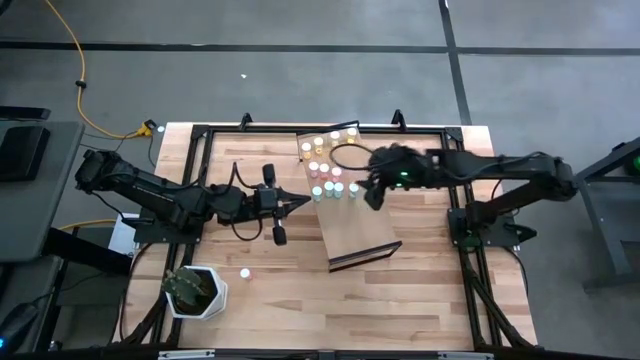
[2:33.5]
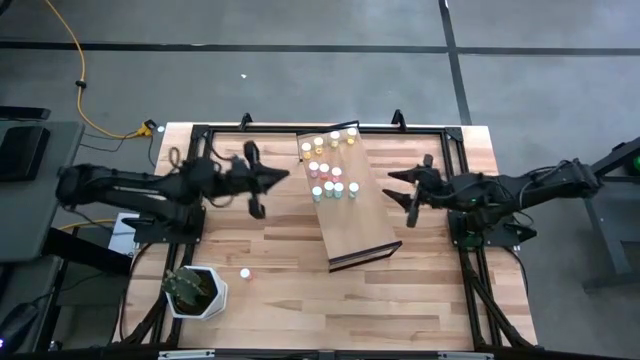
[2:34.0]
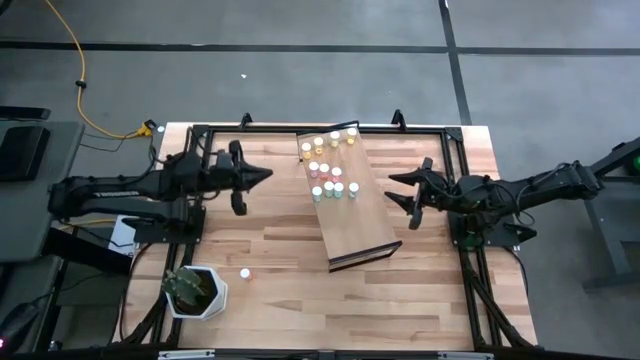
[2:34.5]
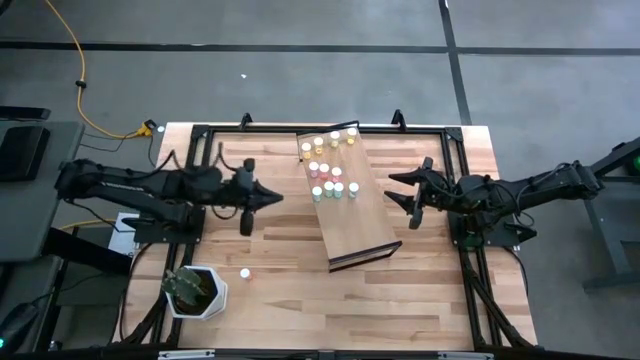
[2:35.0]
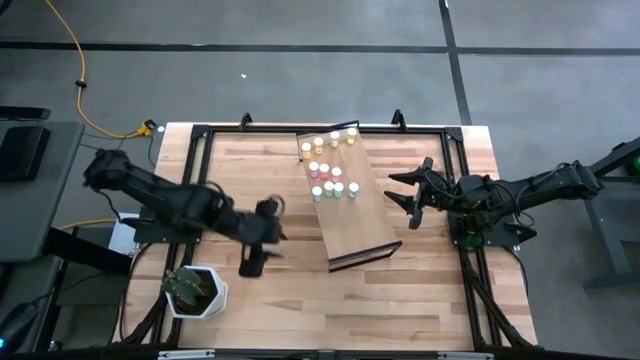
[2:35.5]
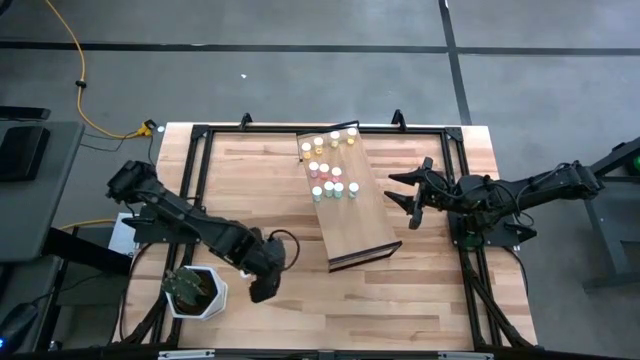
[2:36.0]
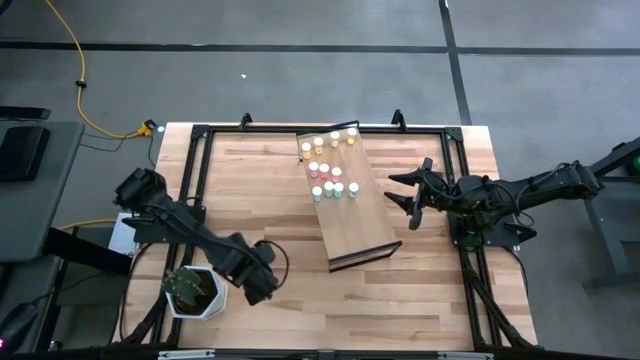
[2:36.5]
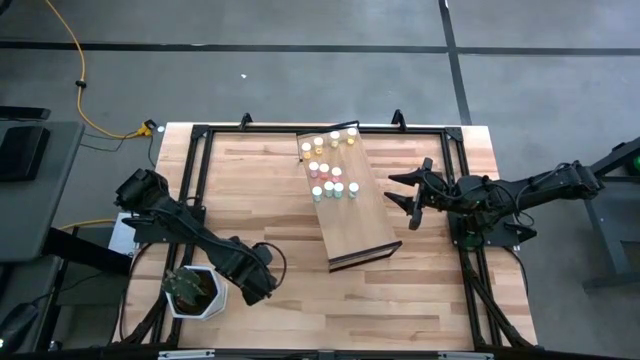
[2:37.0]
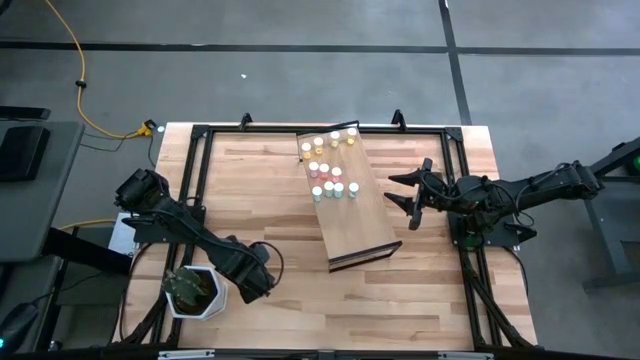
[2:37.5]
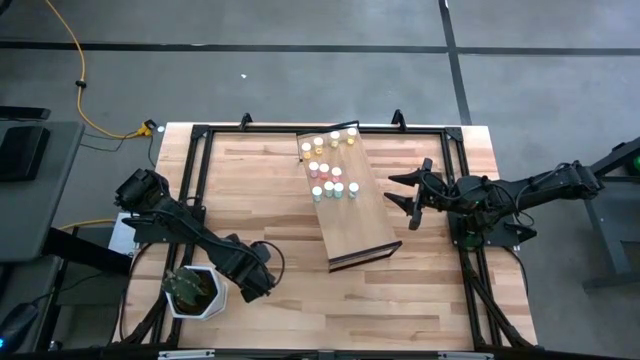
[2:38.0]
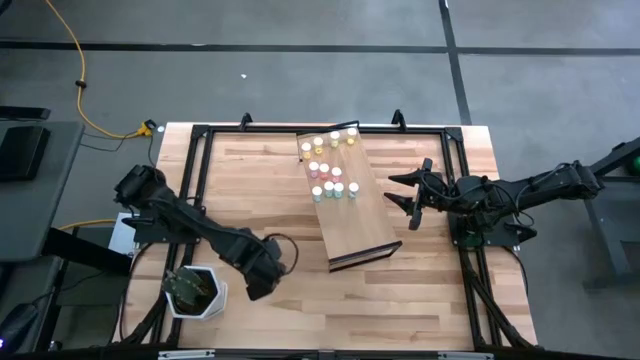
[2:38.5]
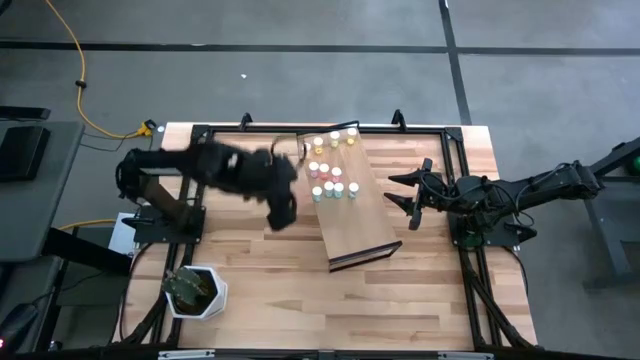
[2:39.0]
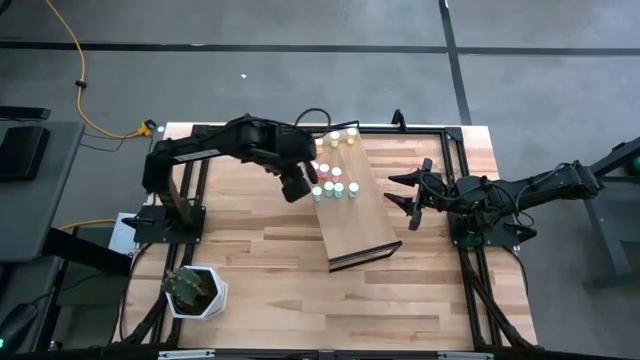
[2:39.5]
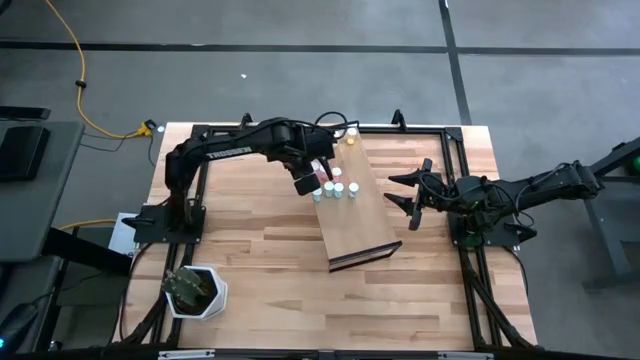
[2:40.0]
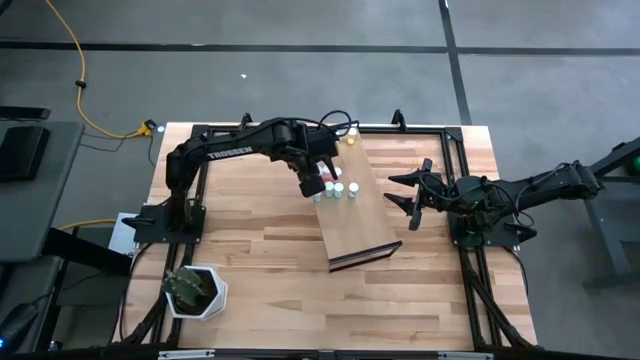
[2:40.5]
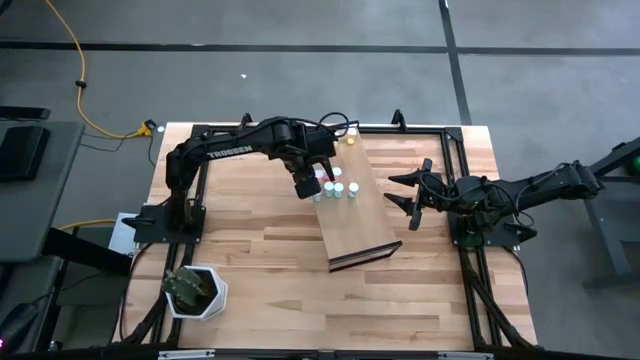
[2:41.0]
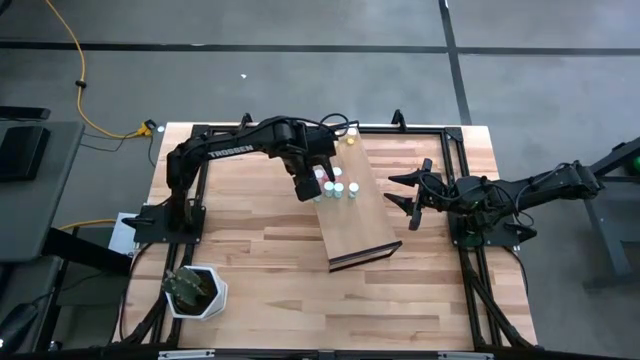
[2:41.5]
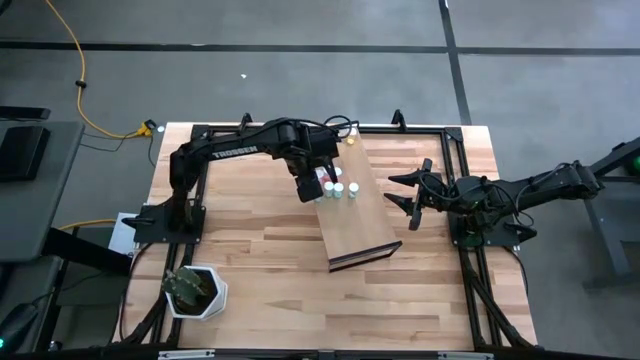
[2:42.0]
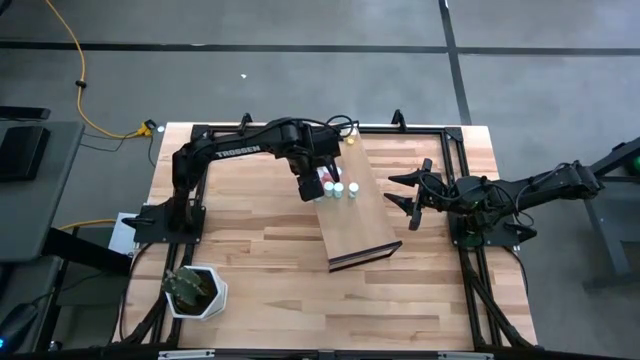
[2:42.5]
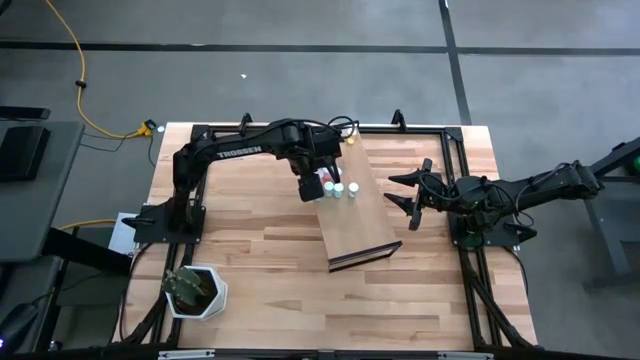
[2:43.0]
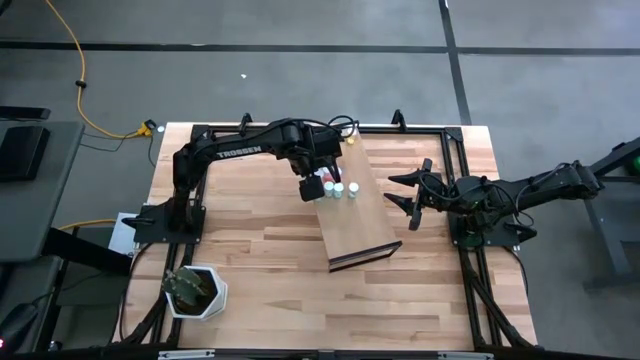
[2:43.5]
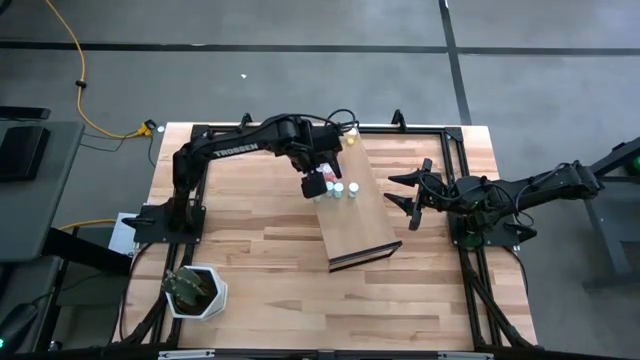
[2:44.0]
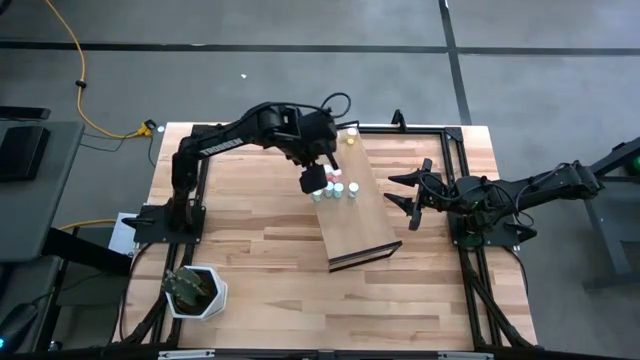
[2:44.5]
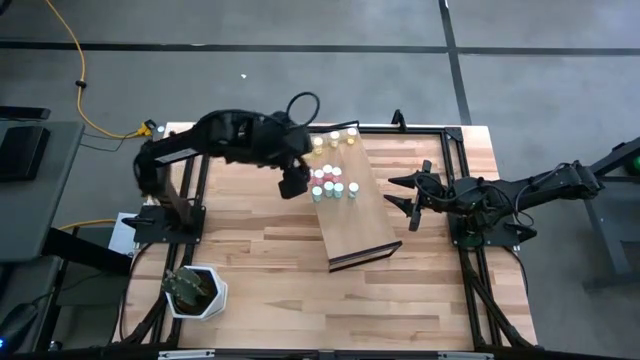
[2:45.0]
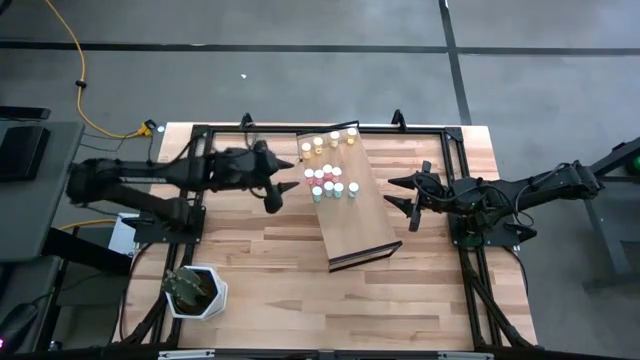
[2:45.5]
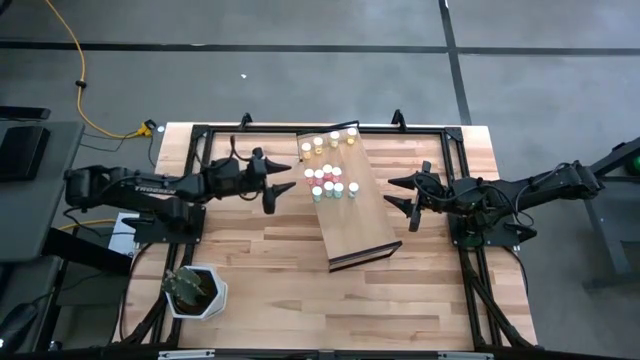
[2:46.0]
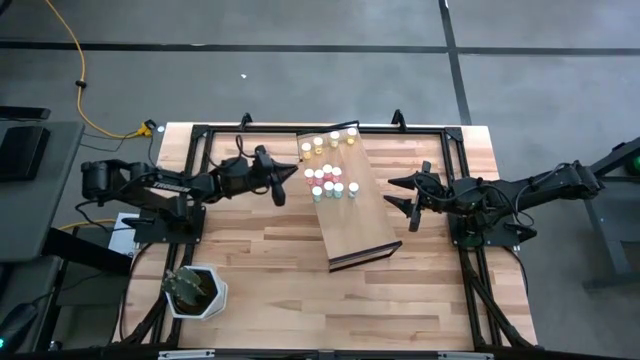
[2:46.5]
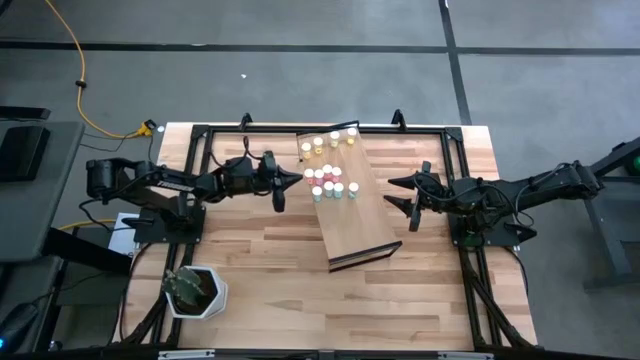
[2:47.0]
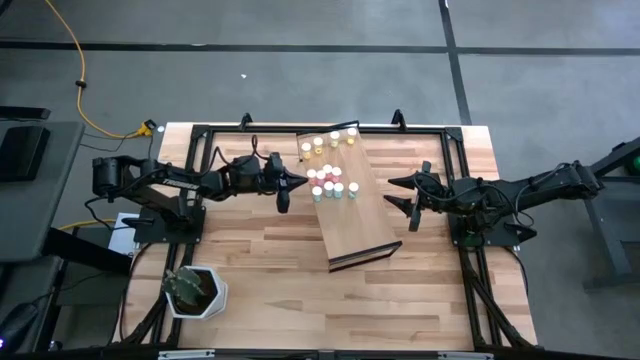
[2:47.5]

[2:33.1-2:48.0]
Task: Pick and place medicine bottles onto shelf by color
Put the pink pill bottle on the shelf

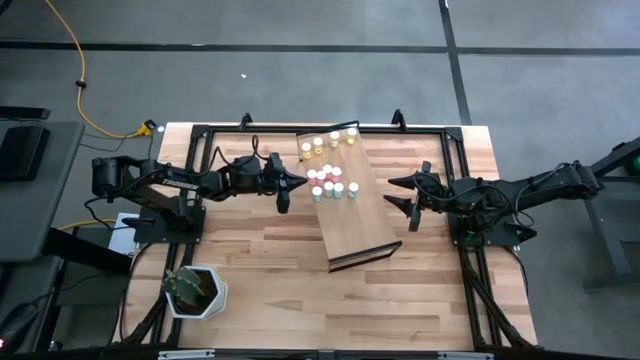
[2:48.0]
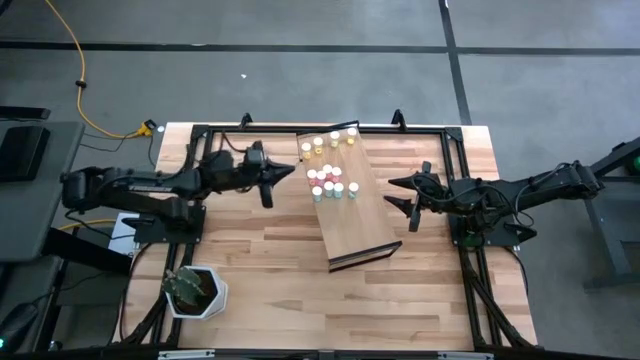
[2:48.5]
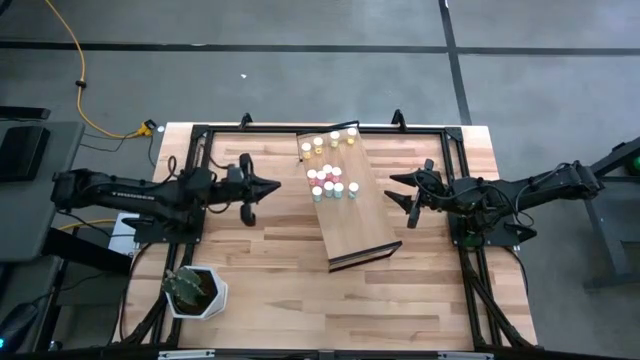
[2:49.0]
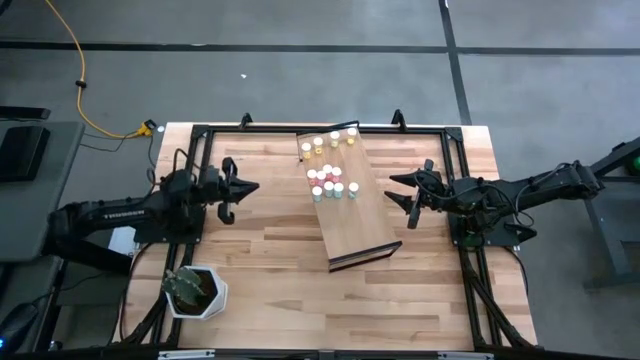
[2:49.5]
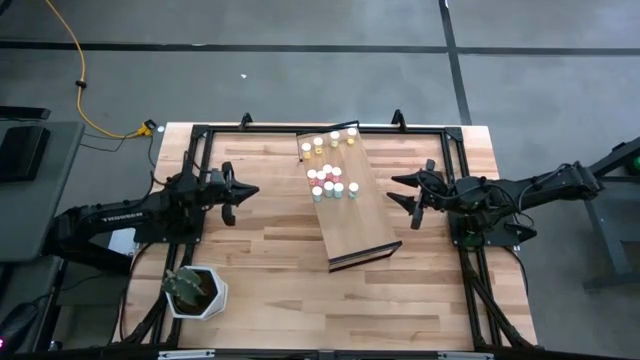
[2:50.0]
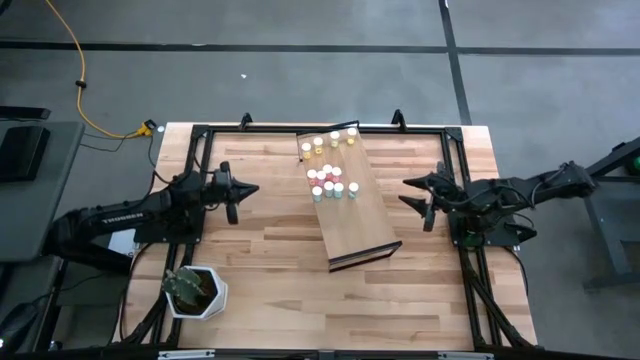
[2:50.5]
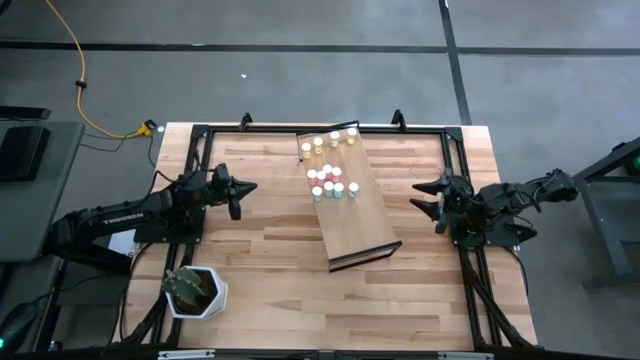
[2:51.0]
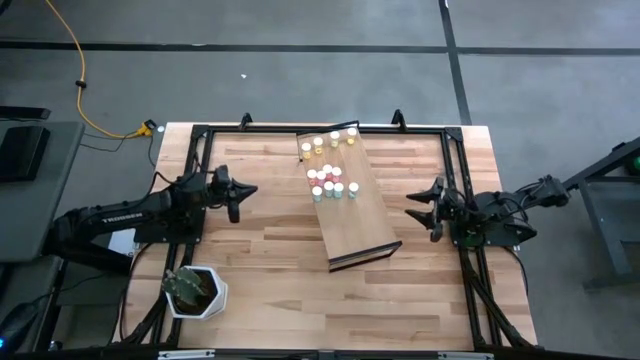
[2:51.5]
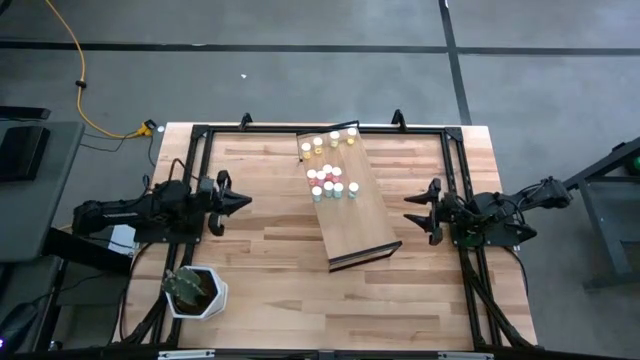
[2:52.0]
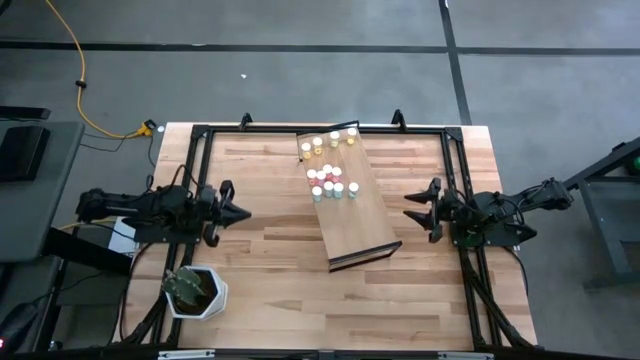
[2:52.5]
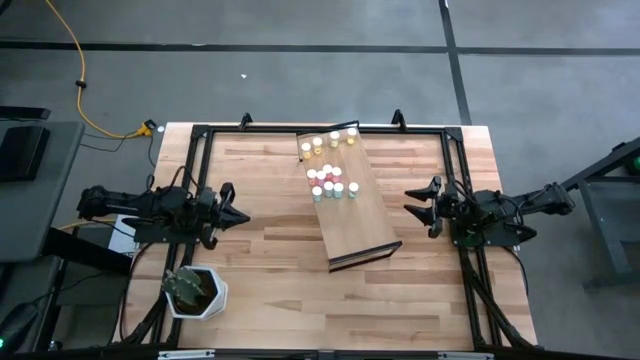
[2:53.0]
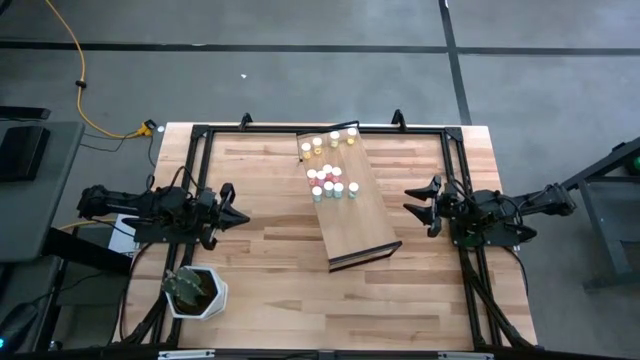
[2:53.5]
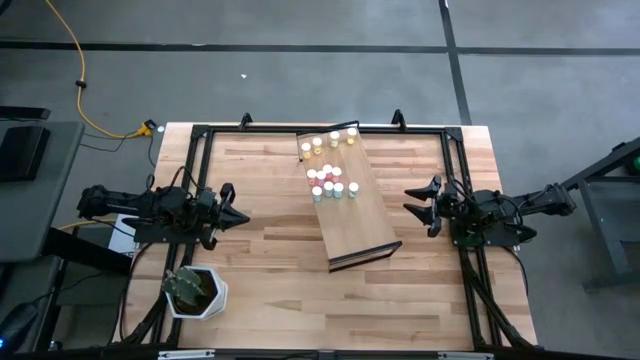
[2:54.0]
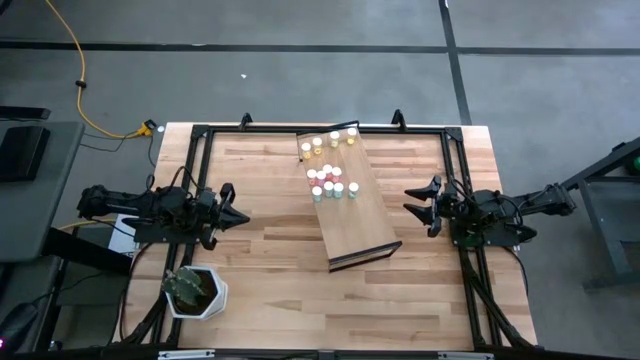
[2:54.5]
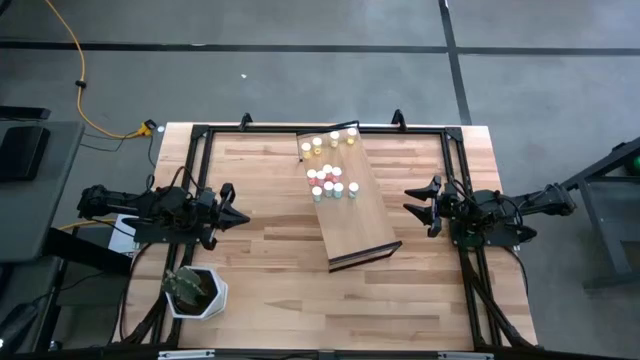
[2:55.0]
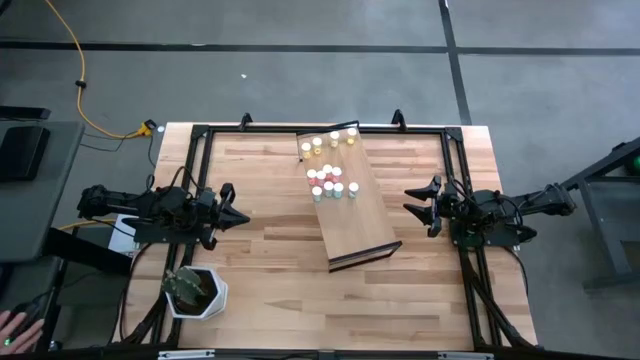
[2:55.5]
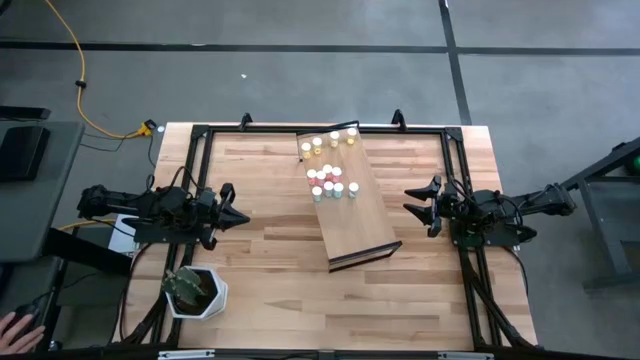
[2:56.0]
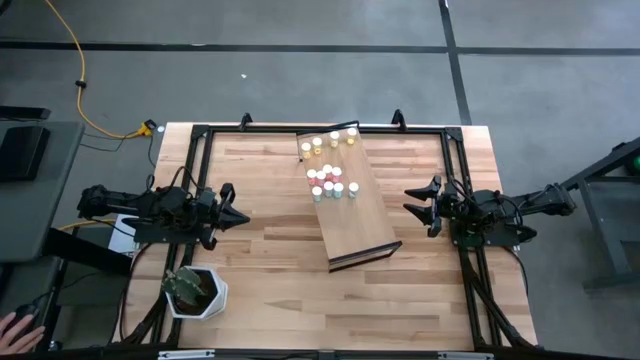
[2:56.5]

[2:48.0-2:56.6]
Return to Home Position
